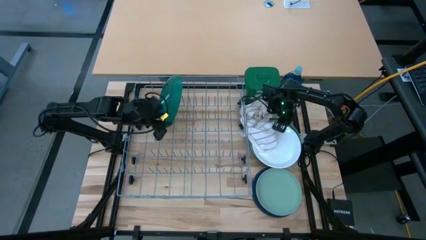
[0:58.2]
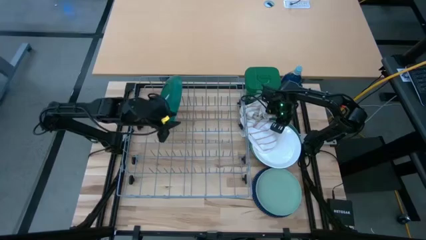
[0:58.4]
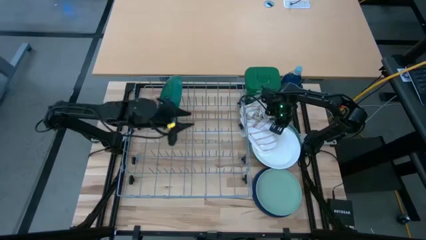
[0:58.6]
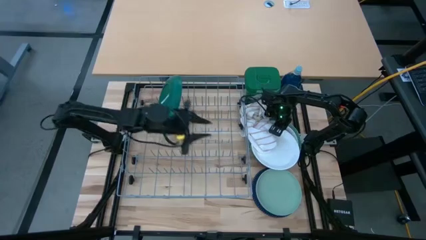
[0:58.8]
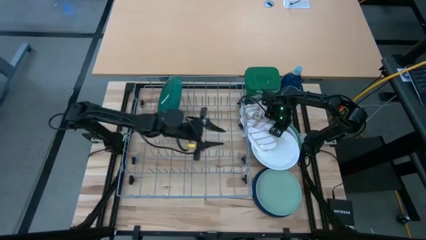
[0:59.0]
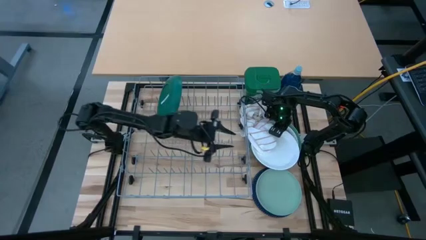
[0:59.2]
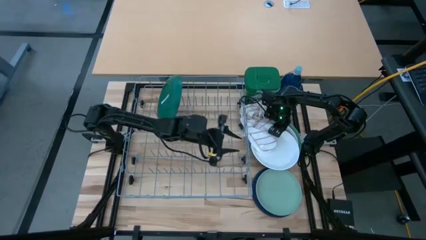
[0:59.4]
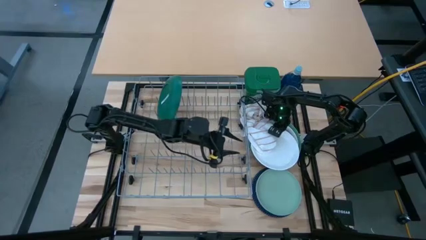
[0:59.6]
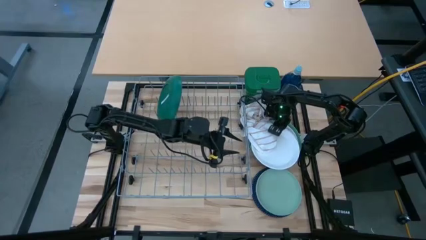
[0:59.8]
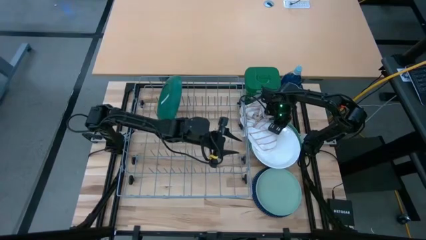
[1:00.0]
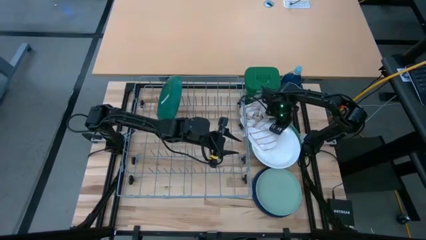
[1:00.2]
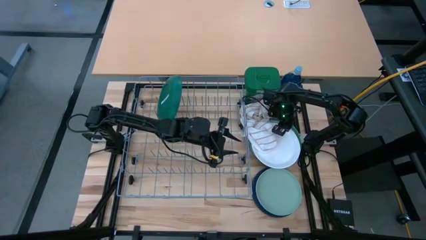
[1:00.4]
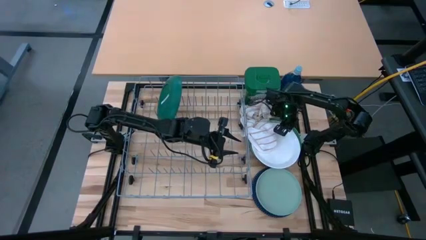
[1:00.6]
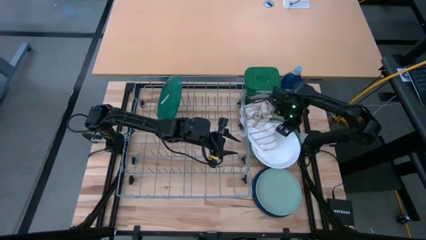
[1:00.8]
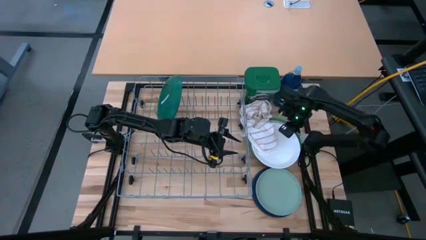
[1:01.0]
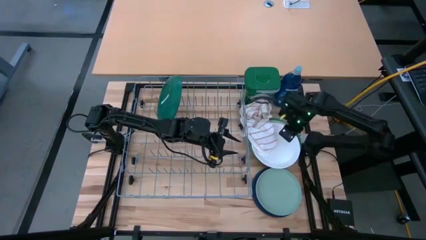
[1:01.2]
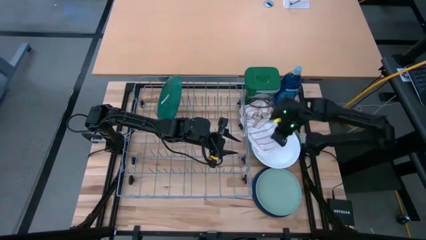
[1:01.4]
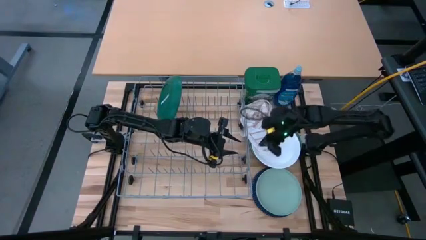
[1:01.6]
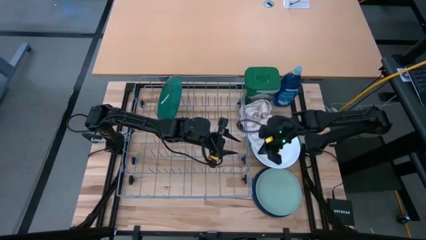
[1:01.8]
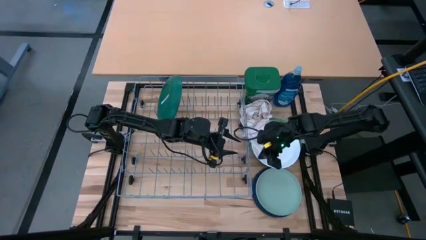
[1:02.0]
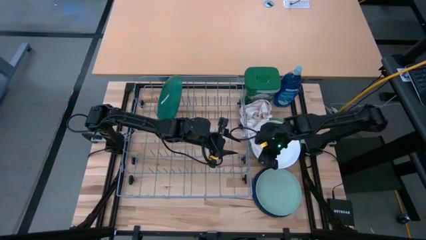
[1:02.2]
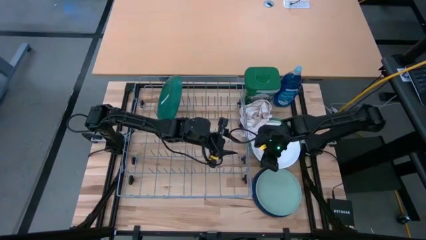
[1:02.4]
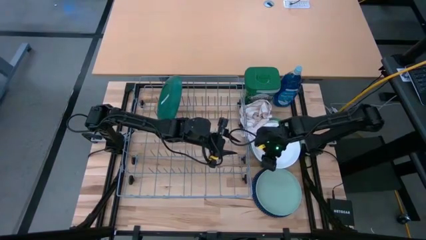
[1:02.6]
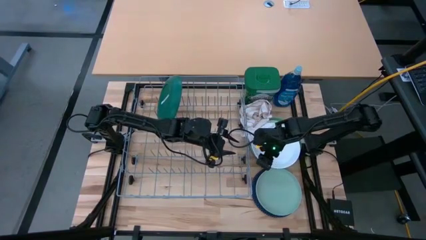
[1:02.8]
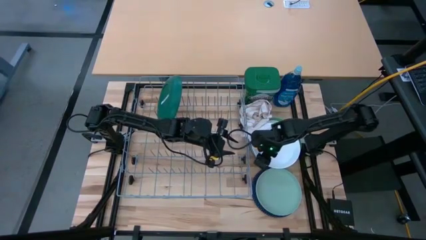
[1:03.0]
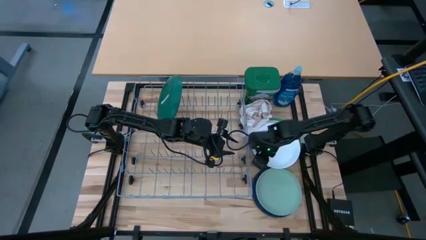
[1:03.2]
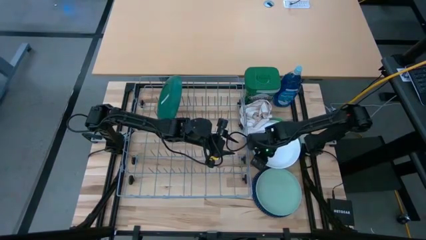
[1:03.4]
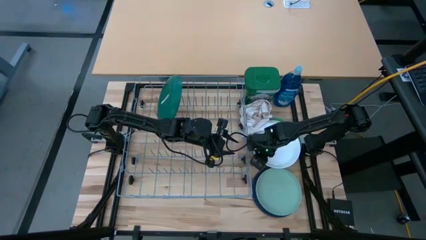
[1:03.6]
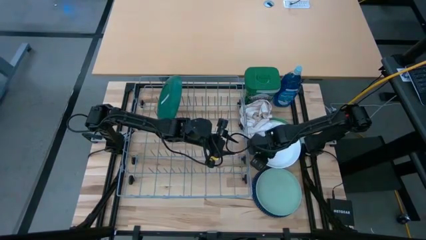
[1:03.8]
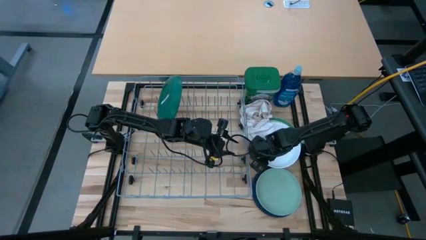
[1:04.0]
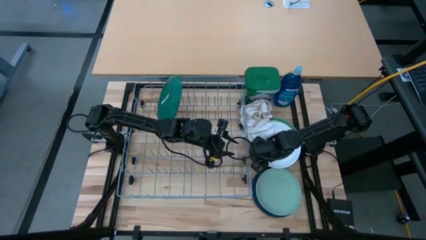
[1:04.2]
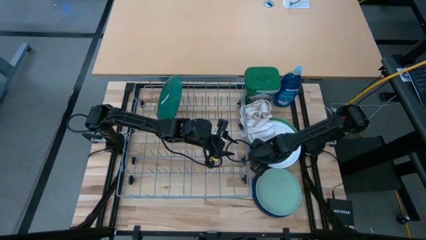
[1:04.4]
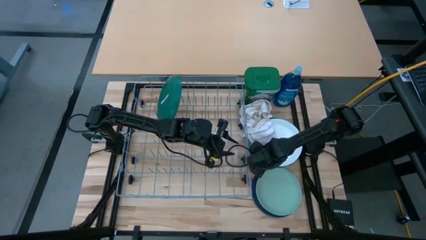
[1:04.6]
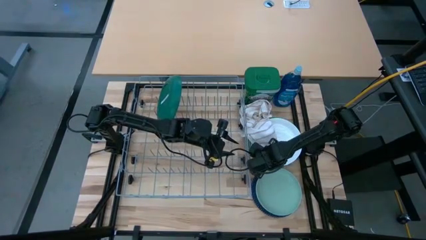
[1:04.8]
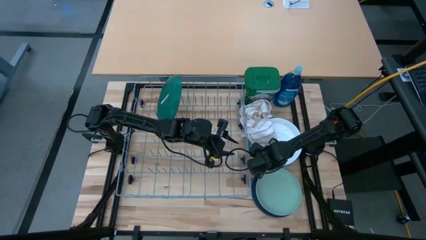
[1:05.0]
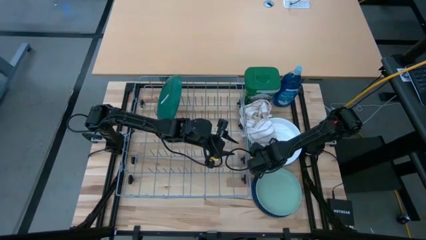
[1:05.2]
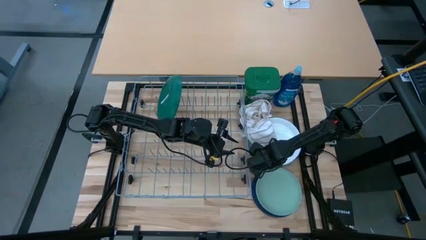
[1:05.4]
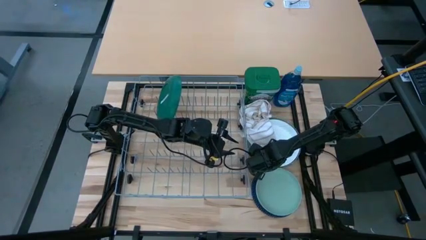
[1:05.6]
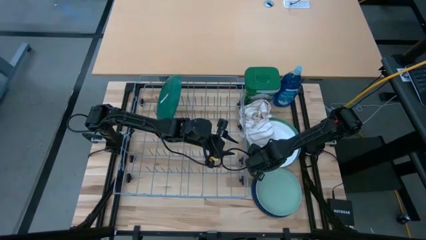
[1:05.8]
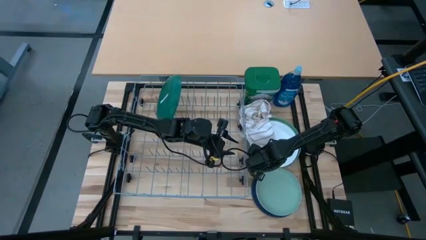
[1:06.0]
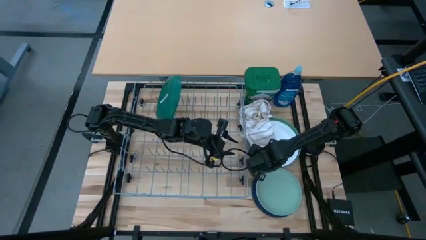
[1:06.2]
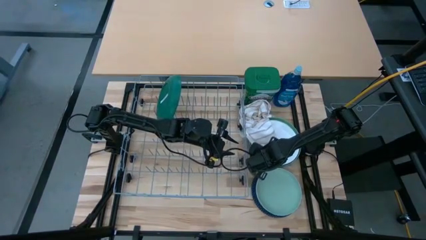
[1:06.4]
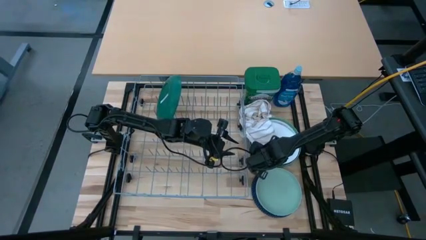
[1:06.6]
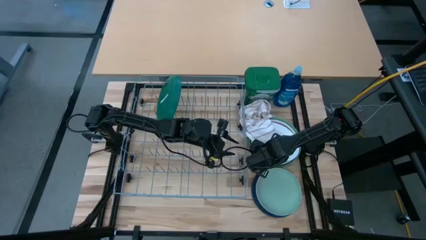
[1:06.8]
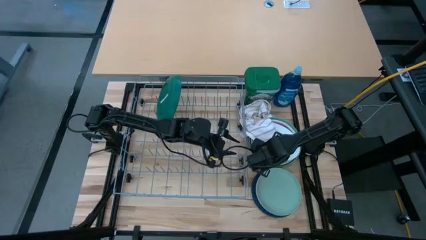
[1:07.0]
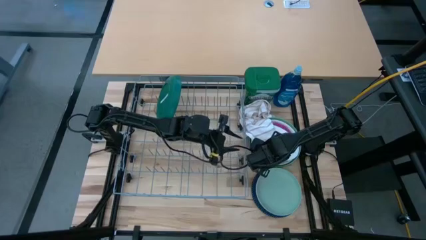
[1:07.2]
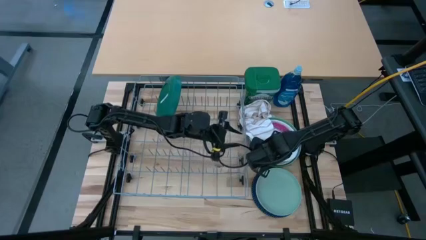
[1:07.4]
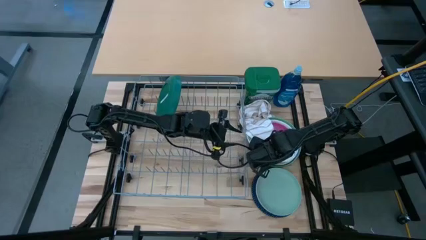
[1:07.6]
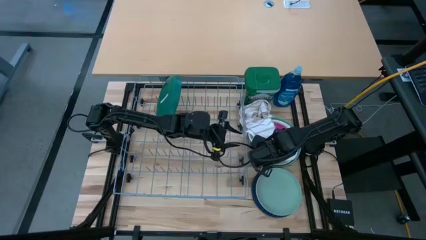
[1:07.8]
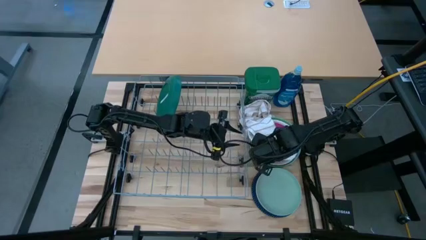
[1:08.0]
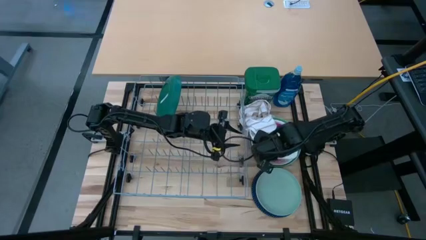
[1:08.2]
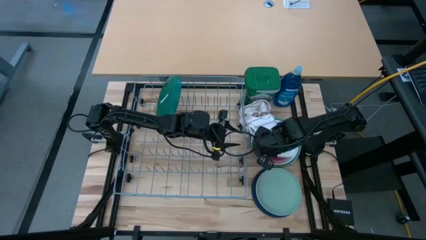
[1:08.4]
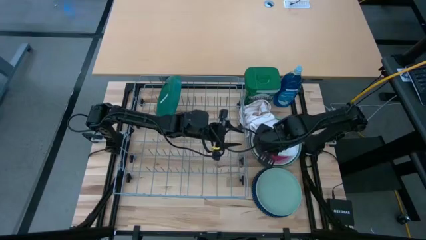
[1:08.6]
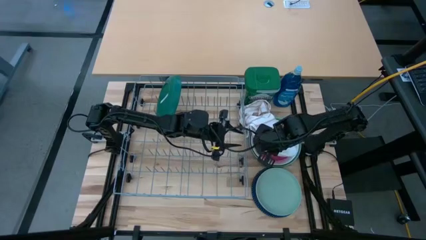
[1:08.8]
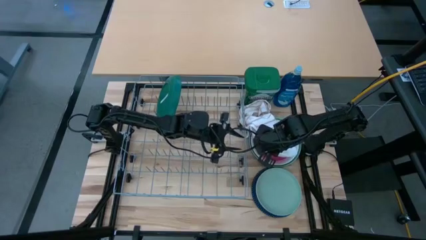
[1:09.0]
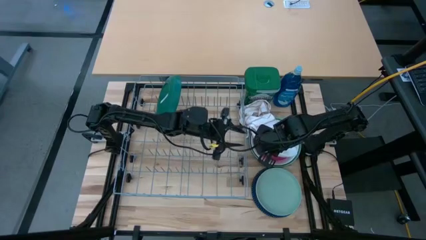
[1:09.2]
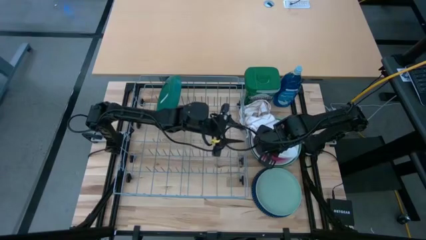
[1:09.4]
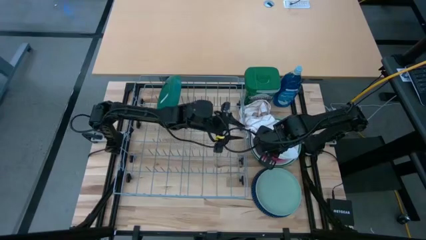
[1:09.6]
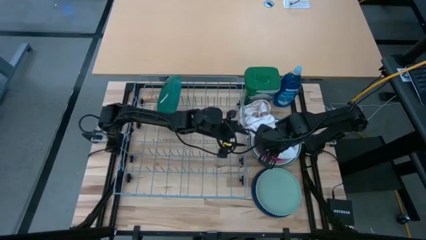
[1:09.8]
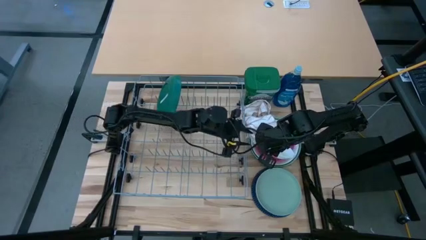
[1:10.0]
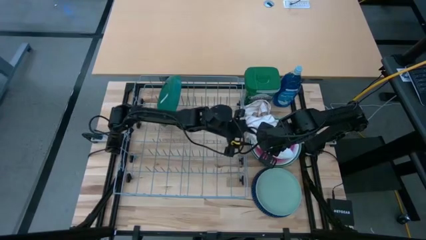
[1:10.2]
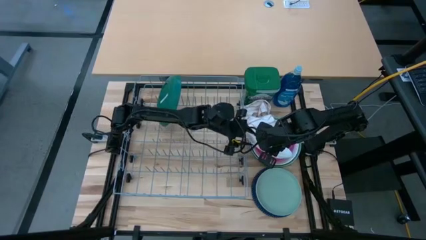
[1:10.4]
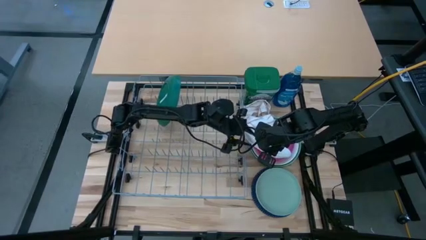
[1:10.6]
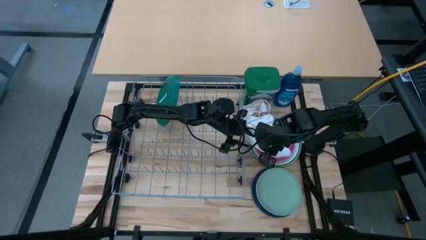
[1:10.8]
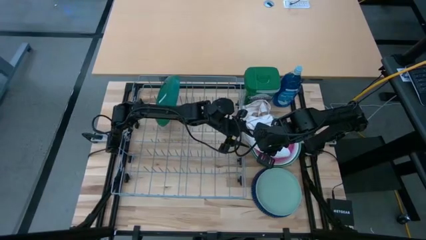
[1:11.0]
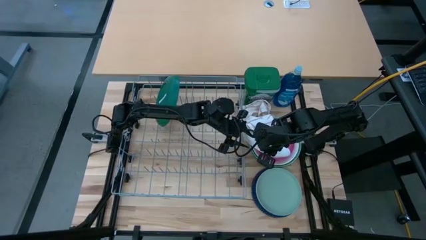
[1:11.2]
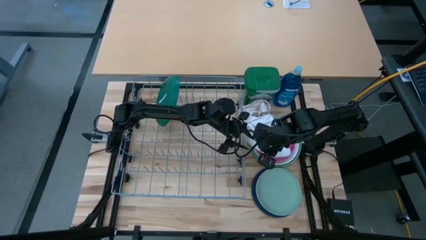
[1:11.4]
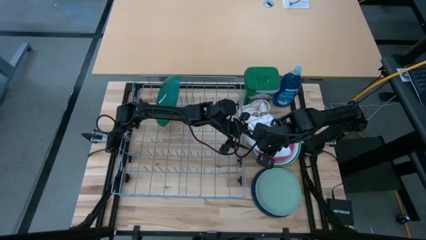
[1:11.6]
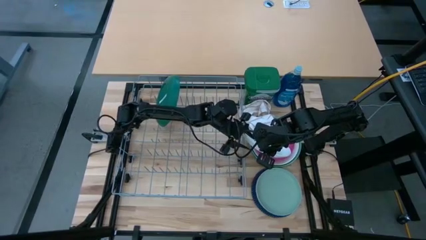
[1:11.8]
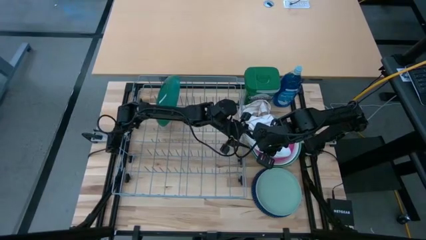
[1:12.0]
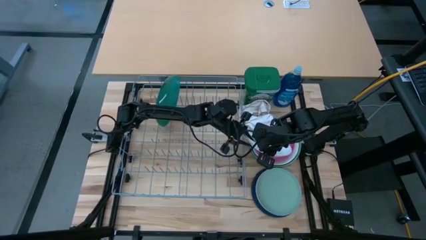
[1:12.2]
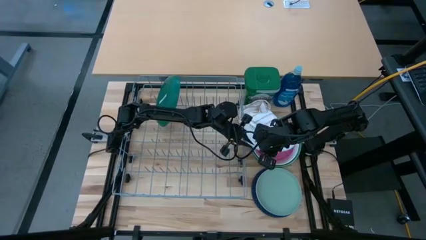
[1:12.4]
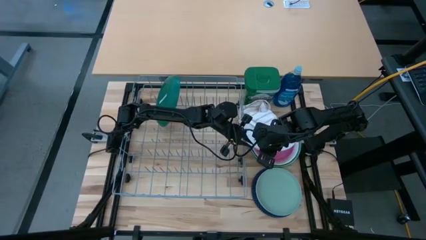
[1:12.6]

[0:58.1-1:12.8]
Task: Sort dishes
Put the white plate in the dish rack
